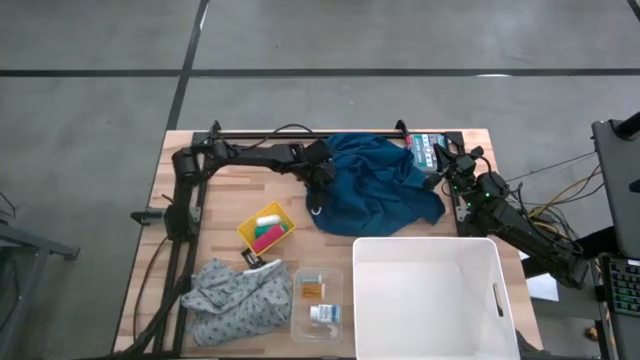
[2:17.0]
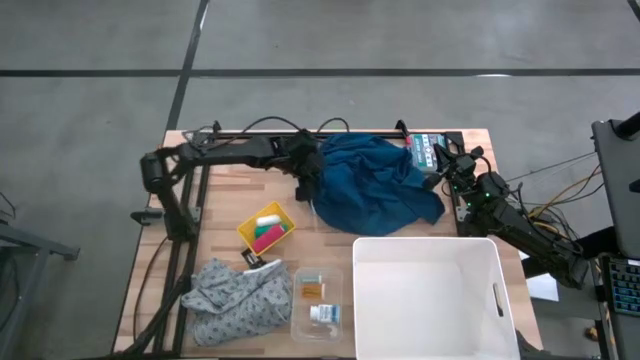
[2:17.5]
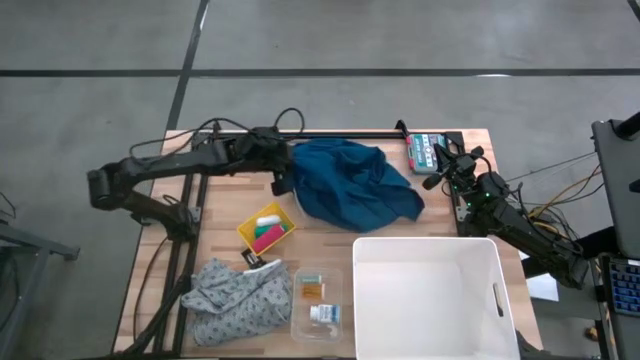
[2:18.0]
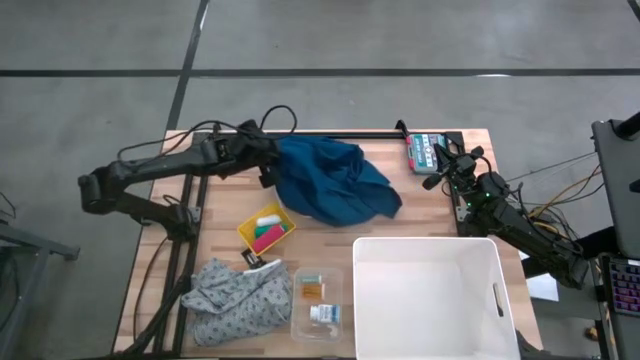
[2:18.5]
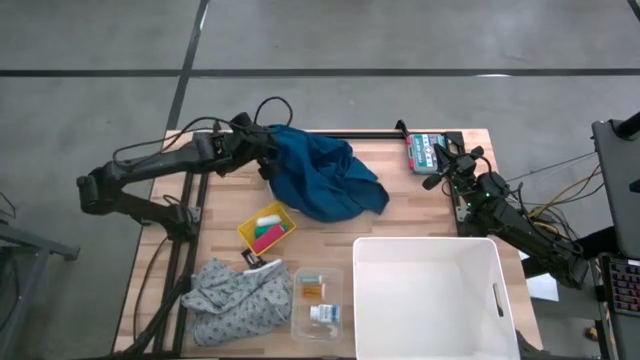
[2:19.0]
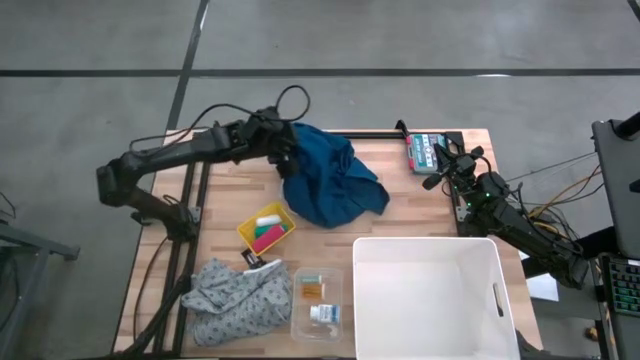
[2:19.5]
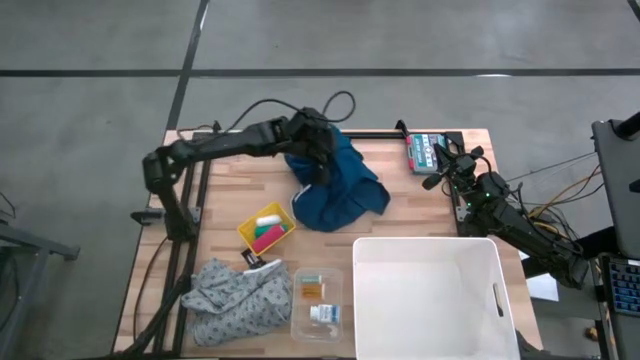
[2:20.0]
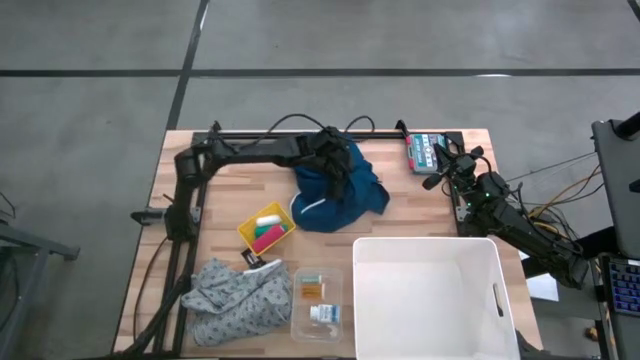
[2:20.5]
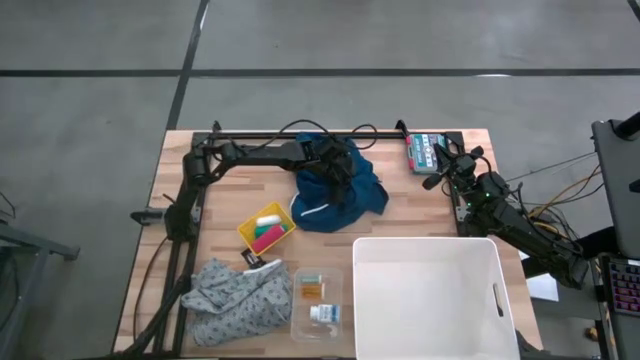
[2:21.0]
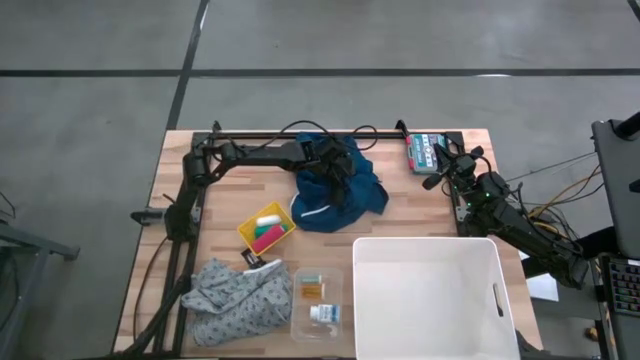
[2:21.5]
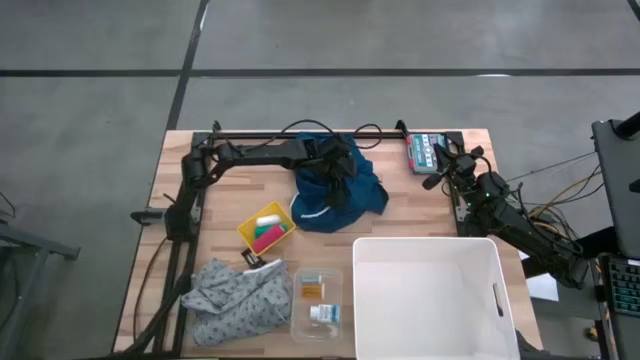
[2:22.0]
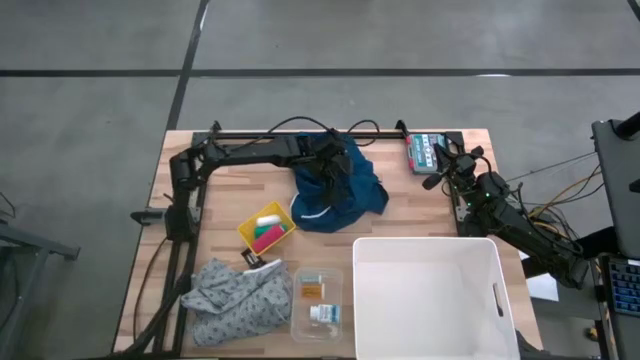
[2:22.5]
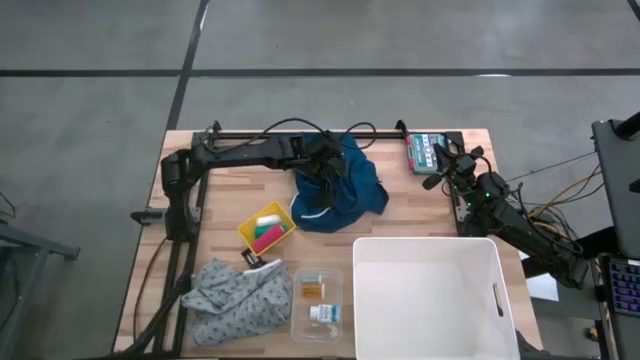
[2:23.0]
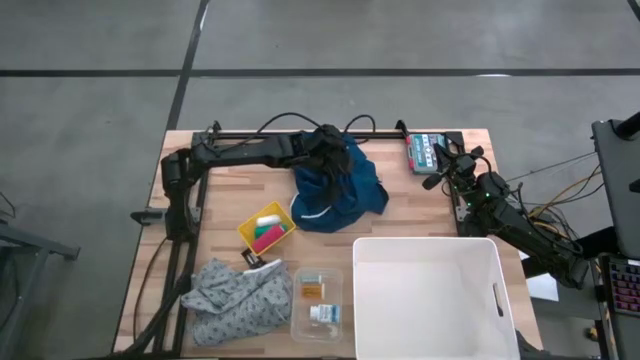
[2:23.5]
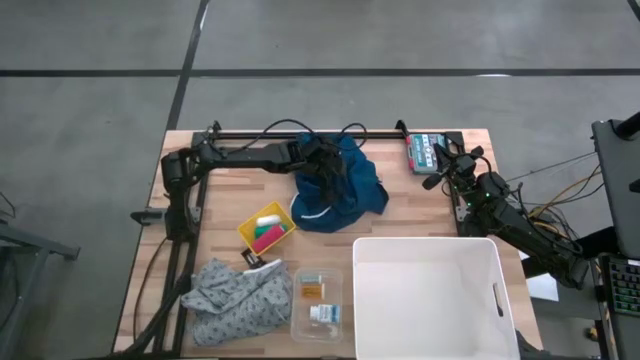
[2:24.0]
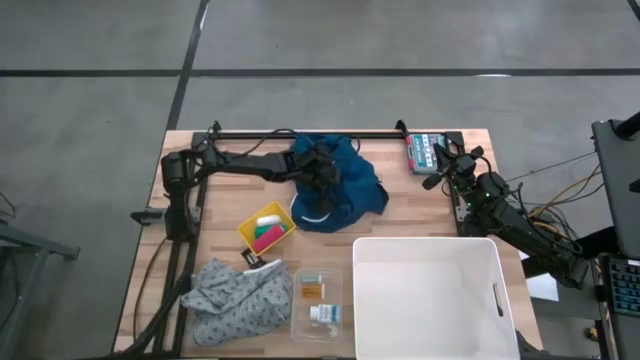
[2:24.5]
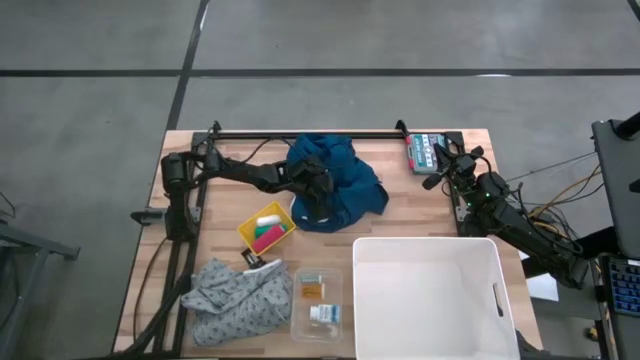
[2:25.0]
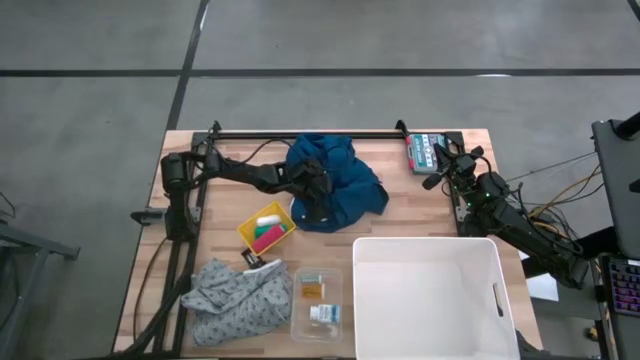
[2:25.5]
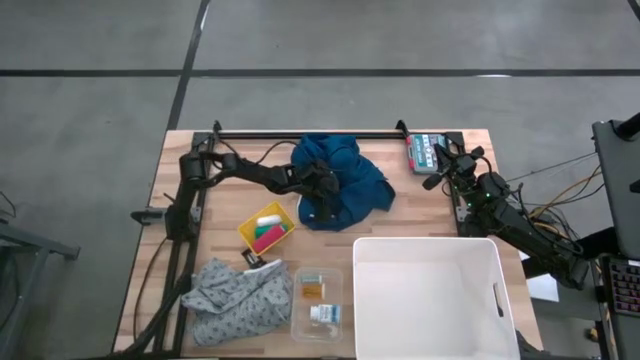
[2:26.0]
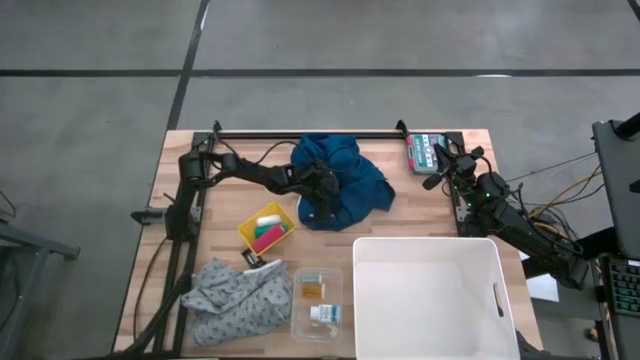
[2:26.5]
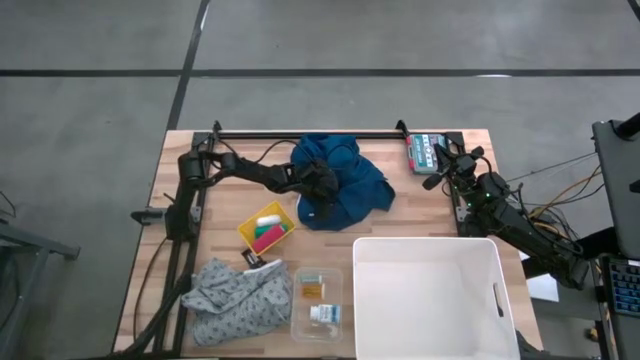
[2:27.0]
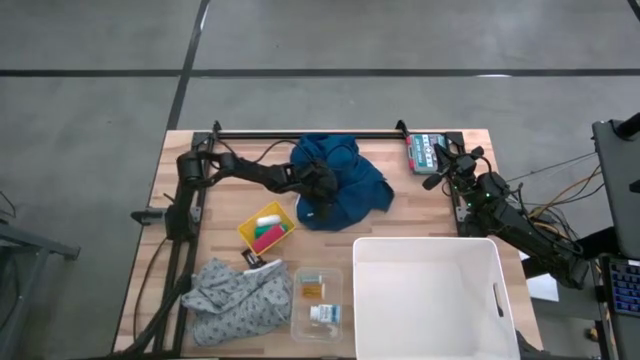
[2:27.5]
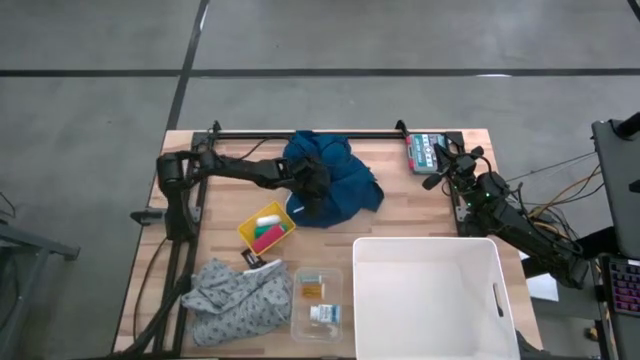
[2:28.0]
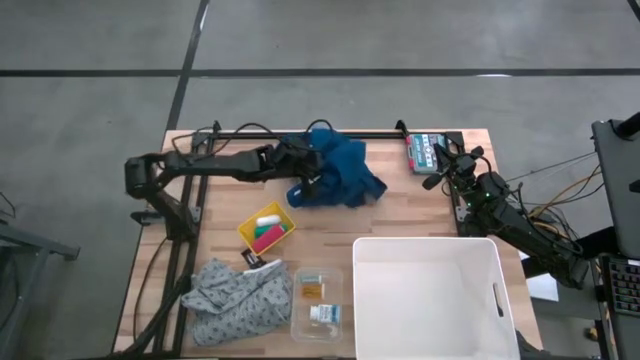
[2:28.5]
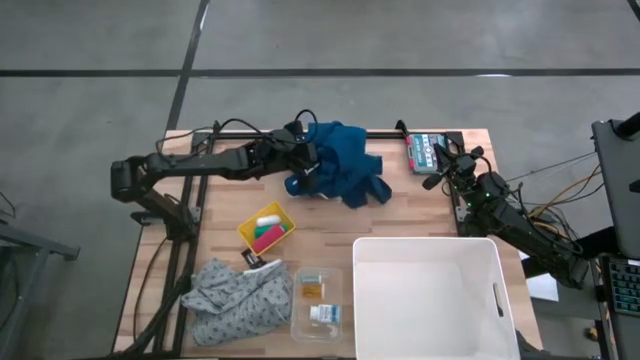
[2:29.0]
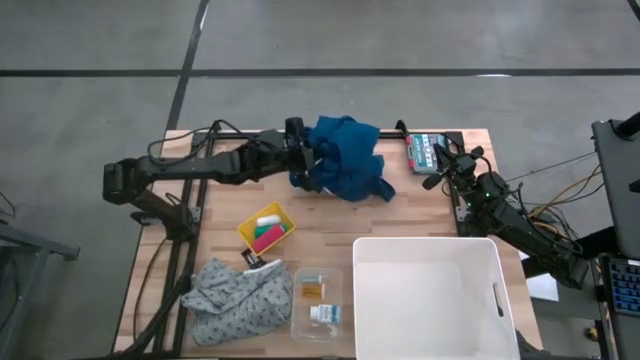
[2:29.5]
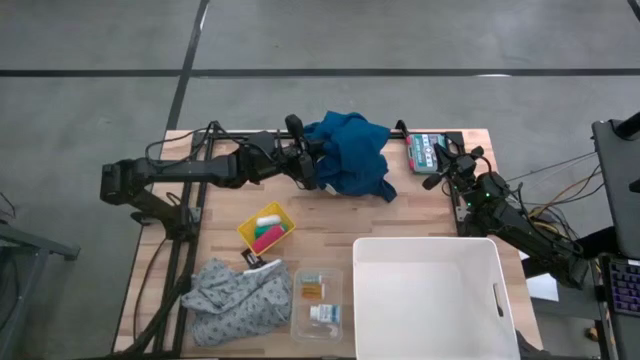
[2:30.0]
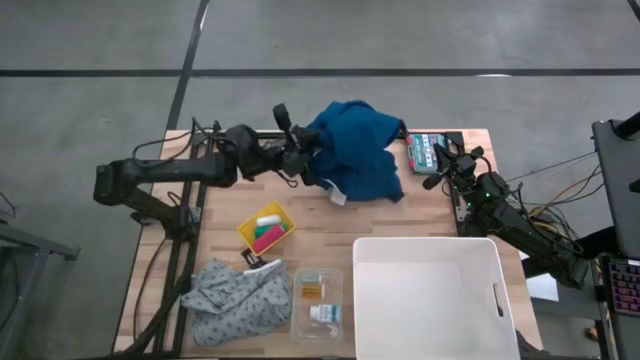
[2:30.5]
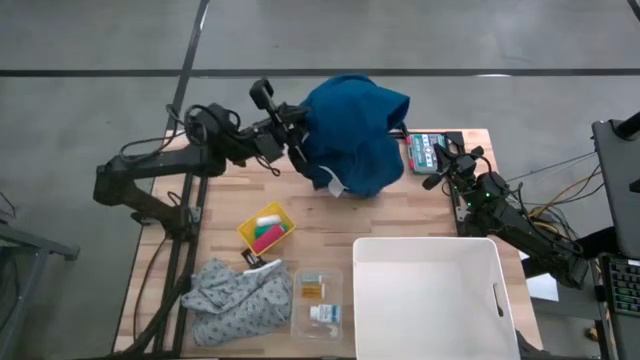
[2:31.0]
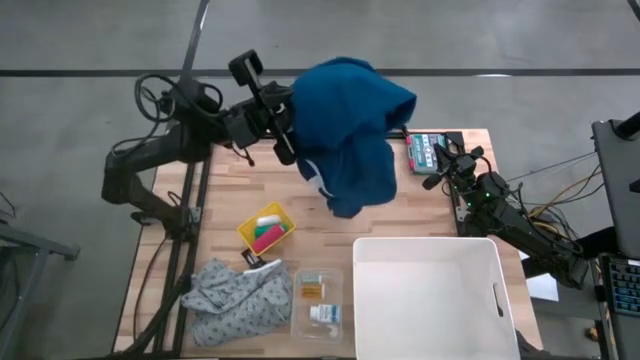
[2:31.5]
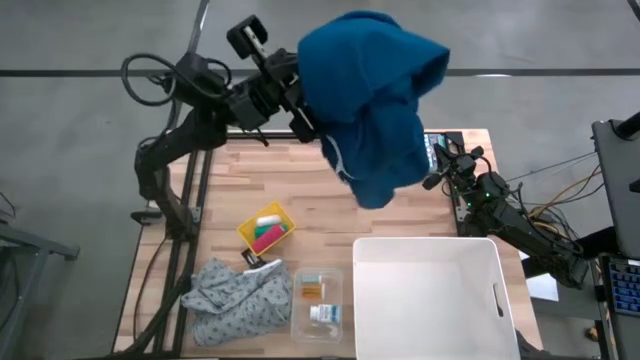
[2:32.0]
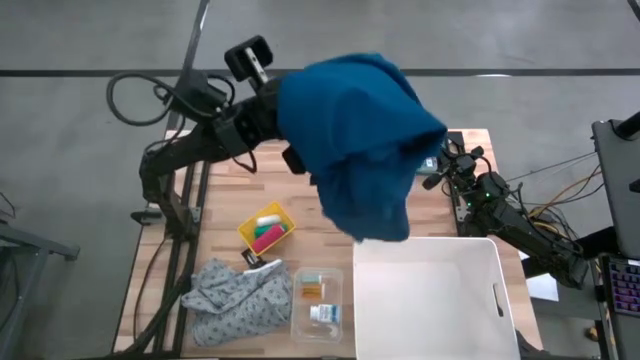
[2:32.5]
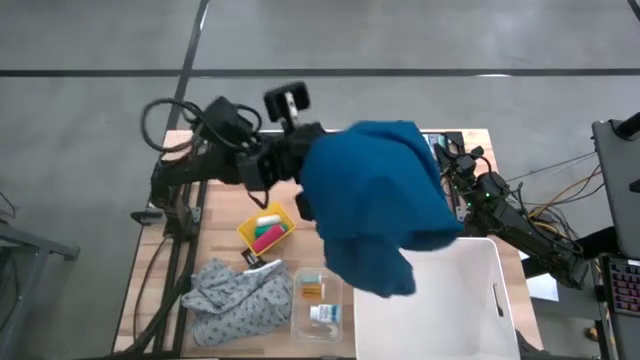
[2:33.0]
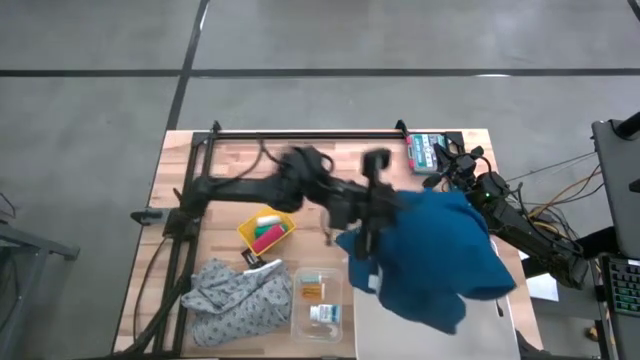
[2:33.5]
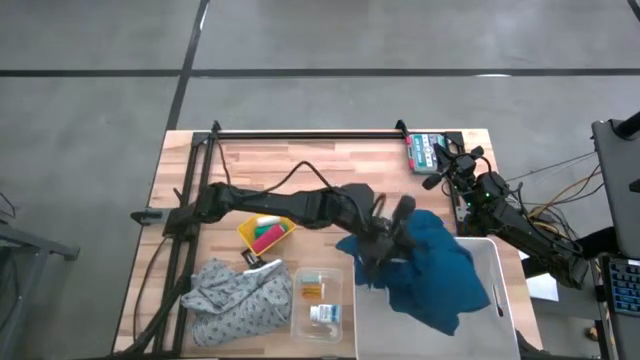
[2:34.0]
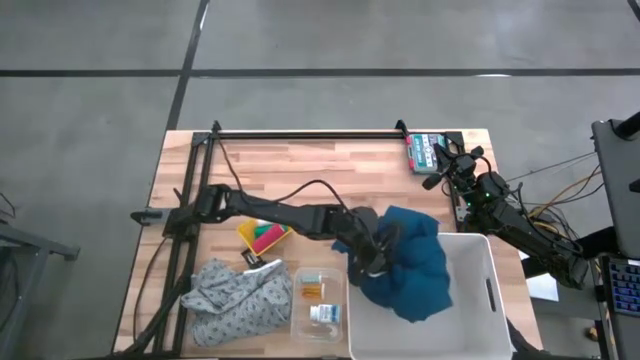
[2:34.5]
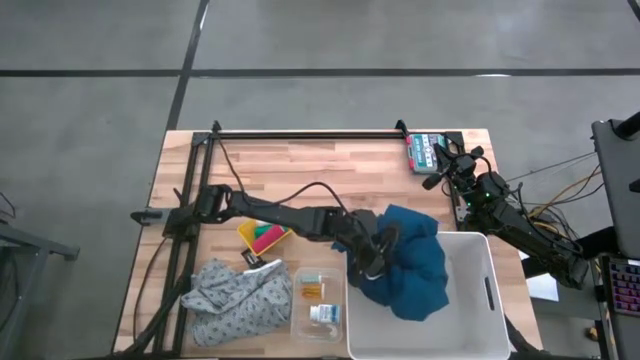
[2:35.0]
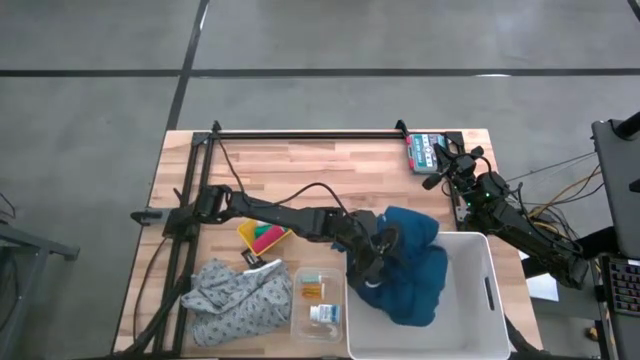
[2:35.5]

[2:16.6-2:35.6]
Task: Pick & Place Medicine items
Put the blue patient gown into the white laundry bin
